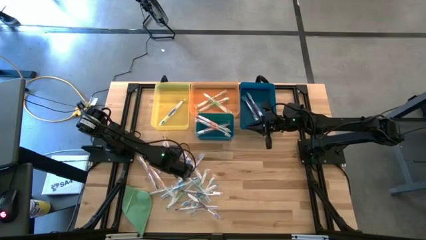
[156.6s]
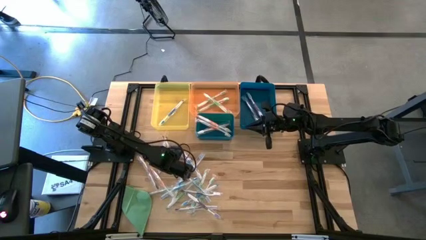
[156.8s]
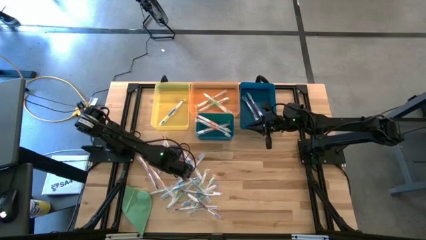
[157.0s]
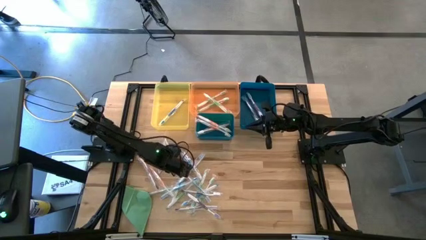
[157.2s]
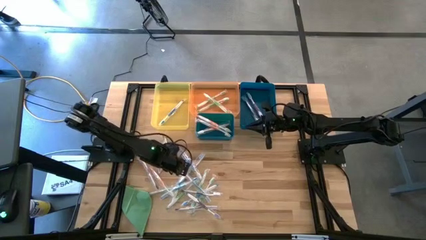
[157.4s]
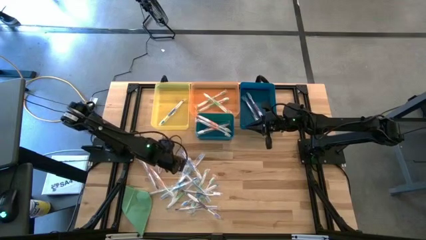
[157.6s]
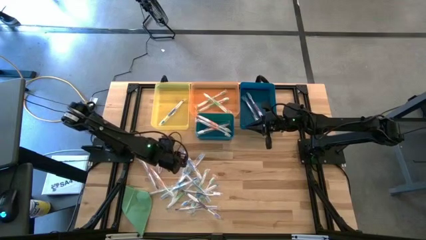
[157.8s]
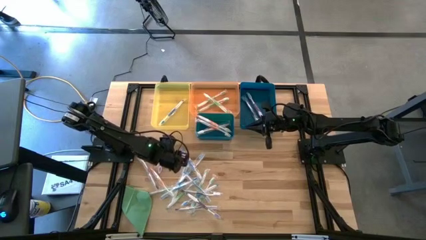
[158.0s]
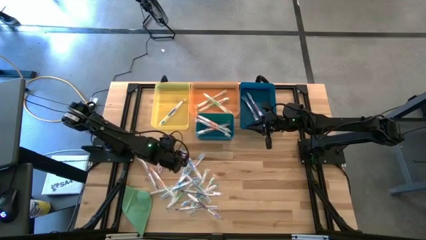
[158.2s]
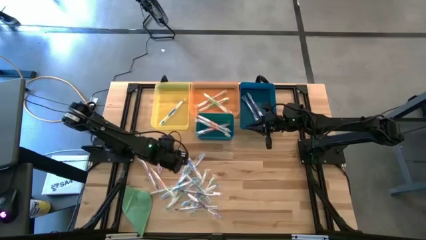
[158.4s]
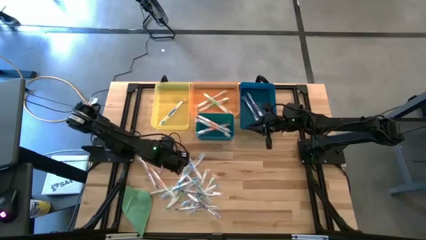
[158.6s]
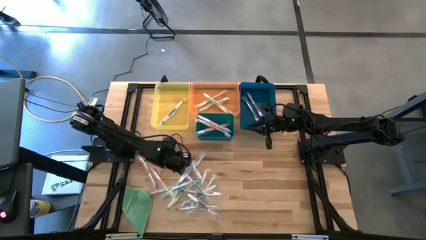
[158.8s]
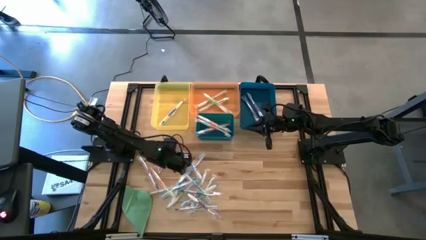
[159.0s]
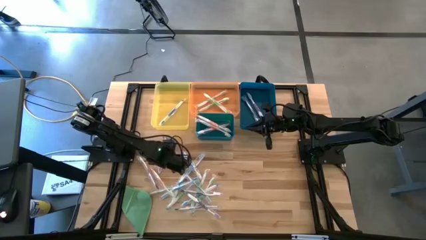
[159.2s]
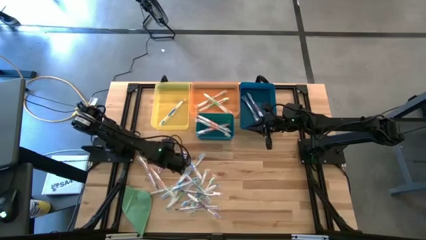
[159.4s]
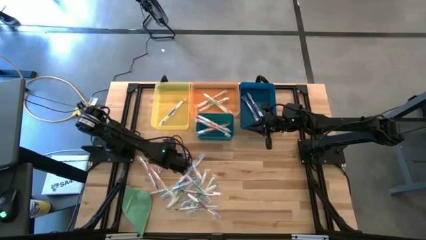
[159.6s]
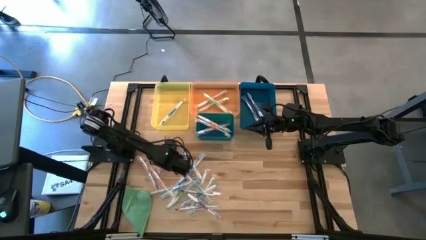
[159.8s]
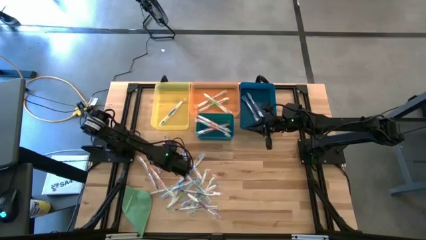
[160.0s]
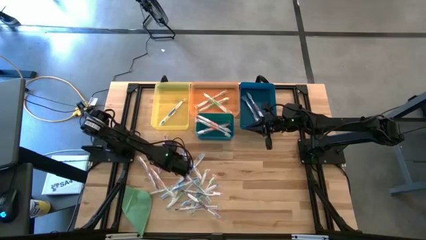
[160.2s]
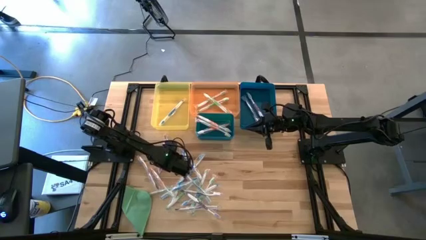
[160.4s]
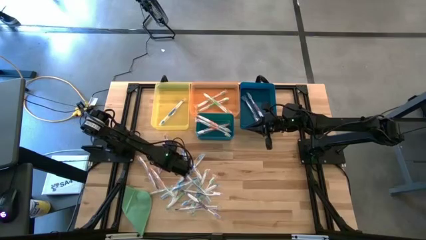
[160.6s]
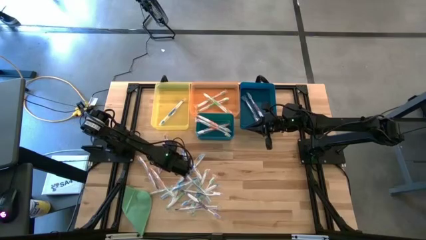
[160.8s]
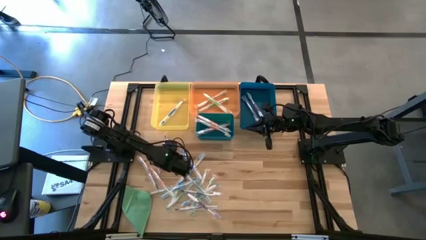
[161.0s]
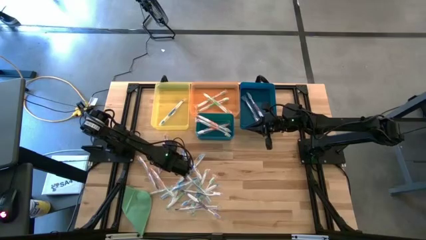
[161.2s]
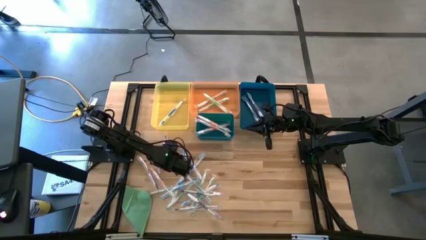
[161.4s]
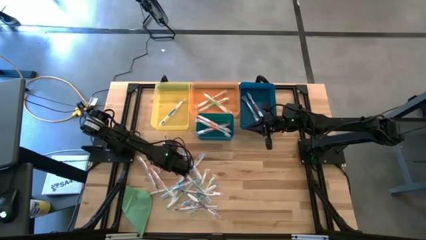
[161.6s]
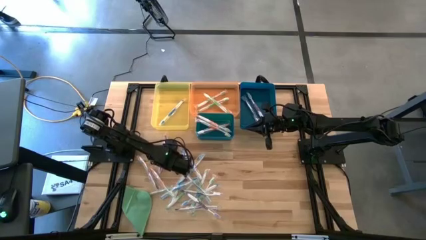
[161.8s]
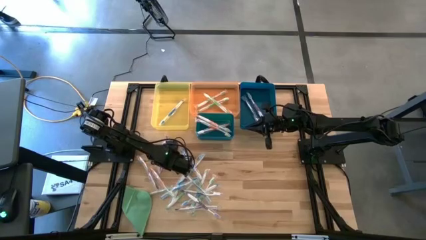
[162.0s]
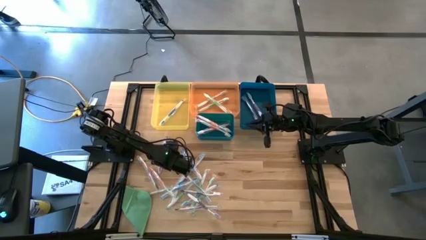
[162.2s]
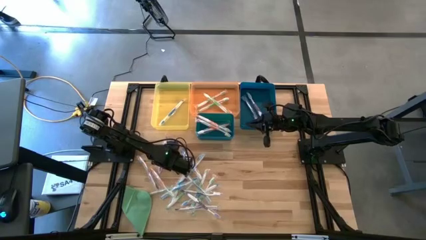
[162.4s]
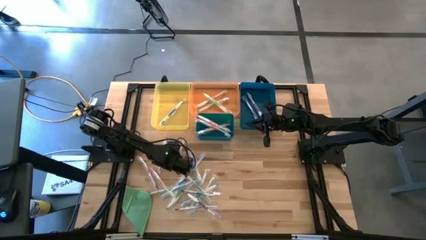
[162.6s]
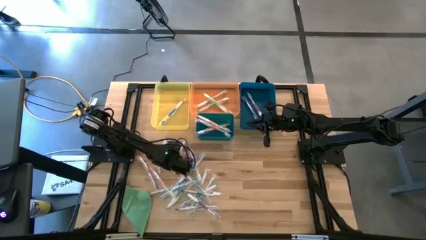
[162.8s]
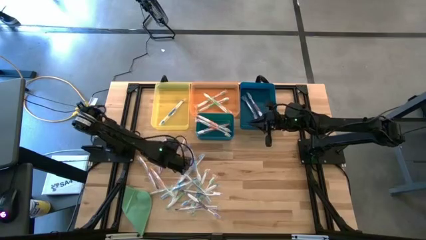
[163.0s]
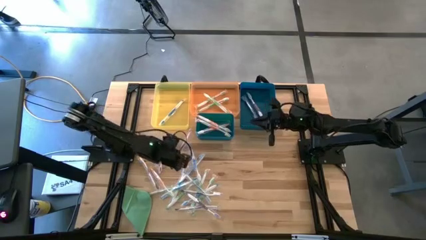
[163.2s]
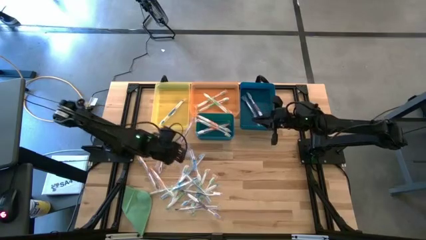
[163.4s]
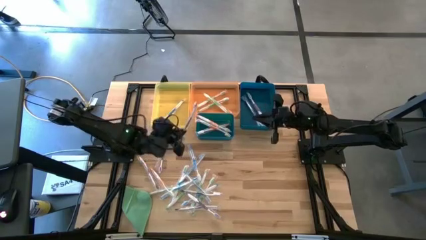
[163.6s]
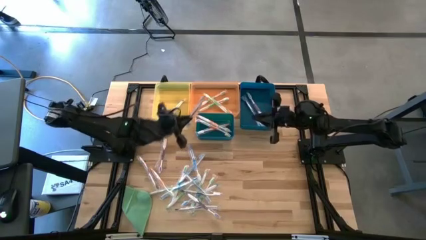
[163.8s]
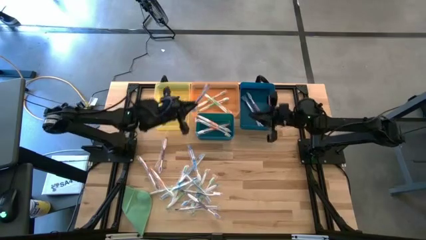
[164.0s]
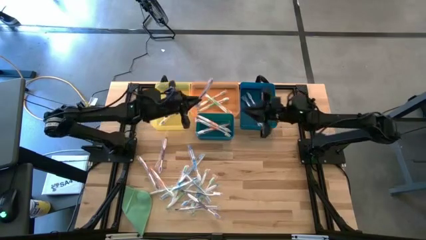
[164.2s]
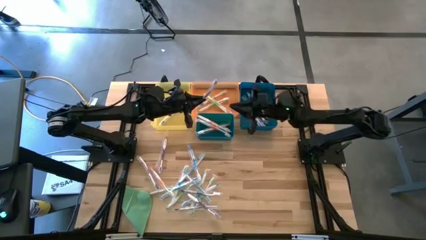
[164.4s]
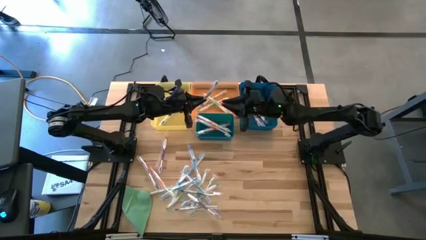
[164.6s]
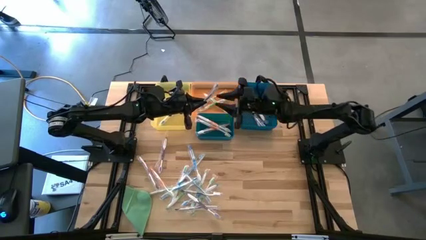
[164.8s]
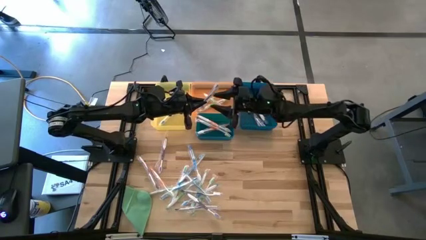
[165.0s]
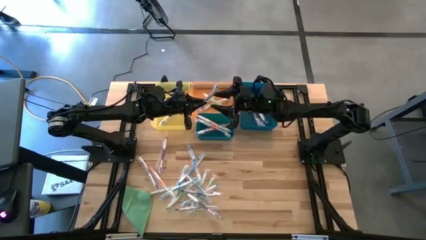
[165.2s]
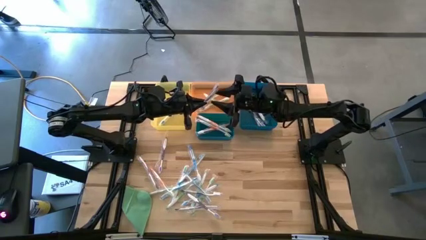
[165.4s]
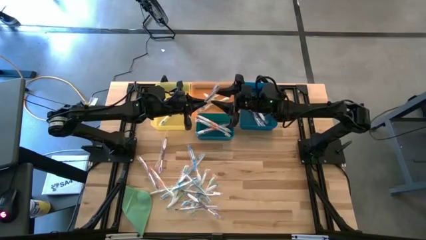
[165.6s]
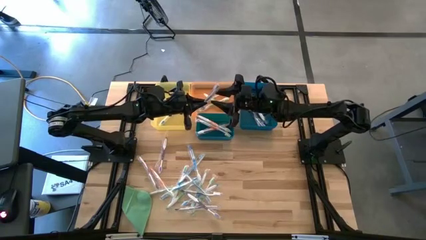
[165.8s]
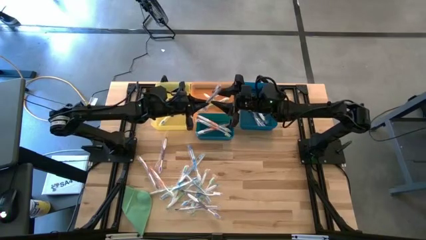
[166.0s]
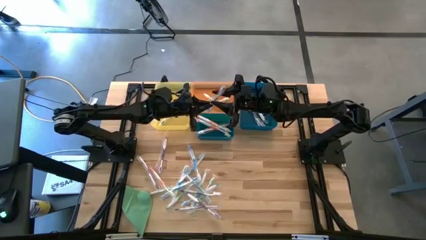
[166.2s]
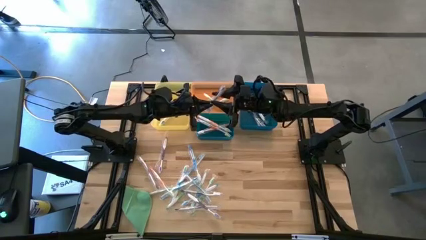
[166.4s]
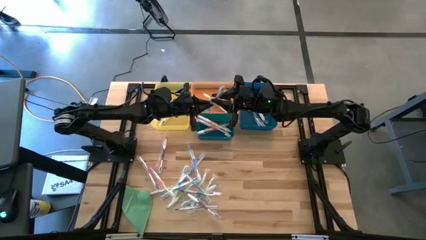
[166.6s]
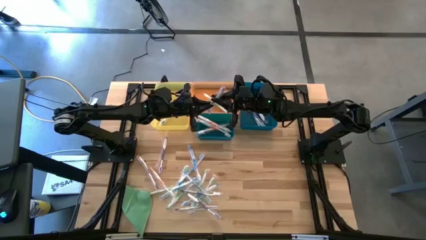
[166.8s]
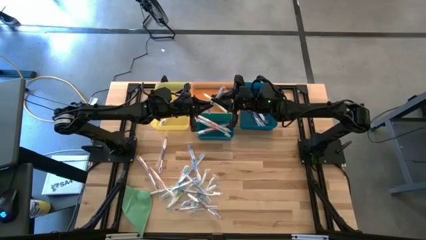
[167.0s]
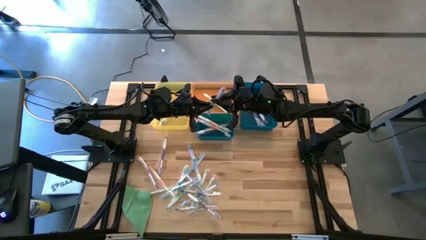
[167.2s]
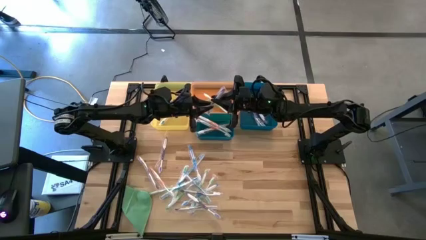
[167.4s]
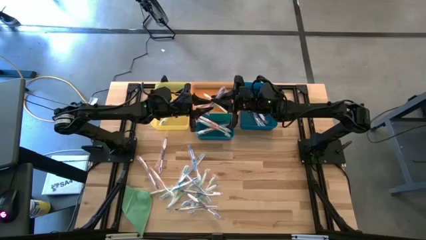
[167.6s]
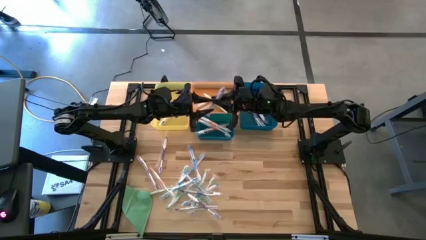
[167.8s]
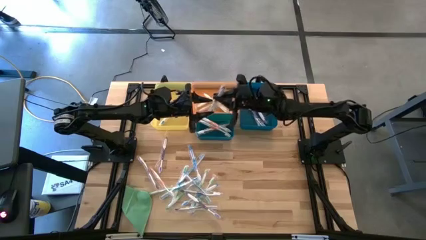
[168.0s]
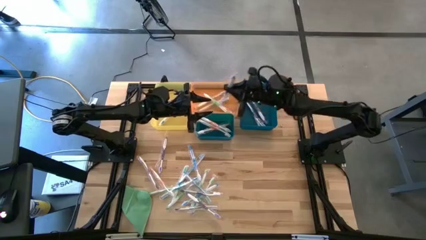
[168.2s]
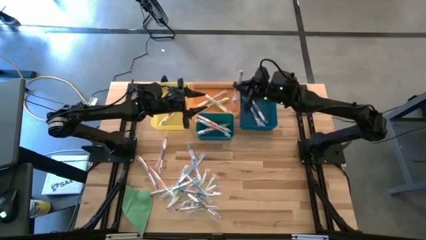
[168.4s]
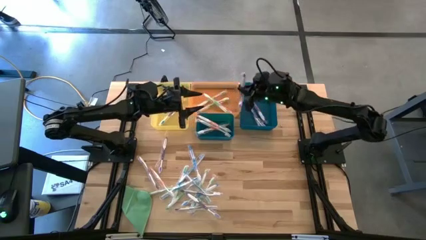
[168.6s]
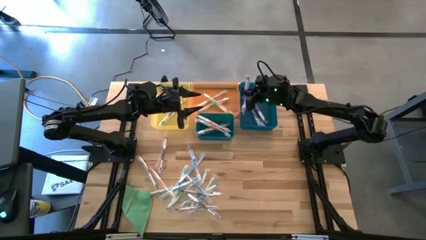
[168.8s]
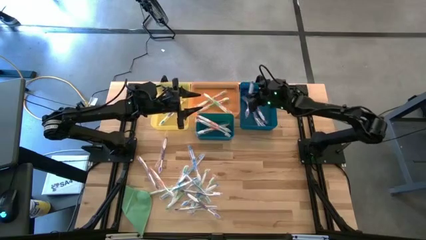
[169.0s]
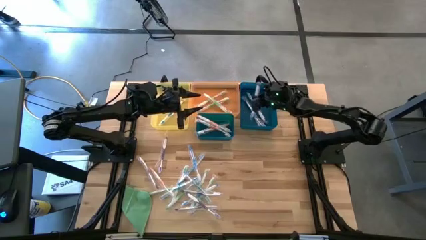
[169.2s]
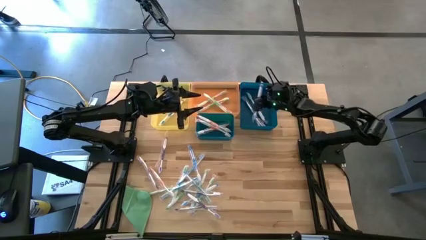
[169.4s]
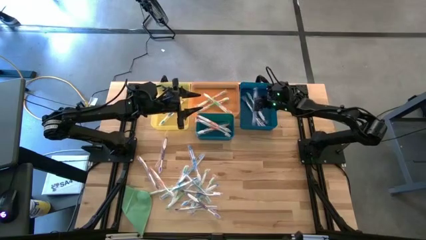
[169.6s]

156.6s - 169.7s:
Task: Pick & Place Toothbrushes
Put the purple toothbrush into the blue bin
